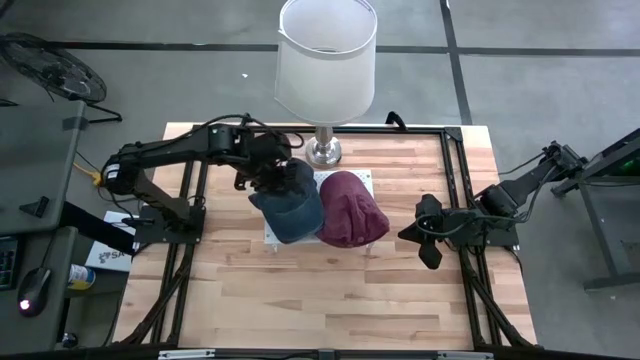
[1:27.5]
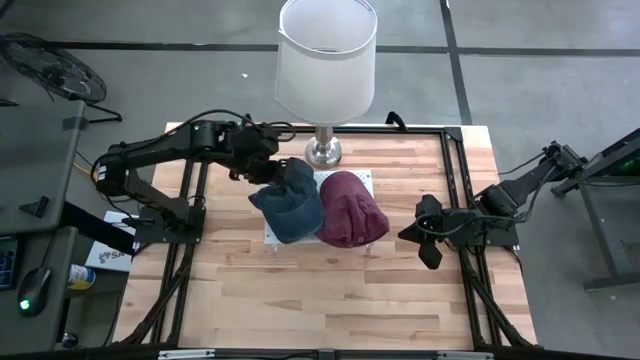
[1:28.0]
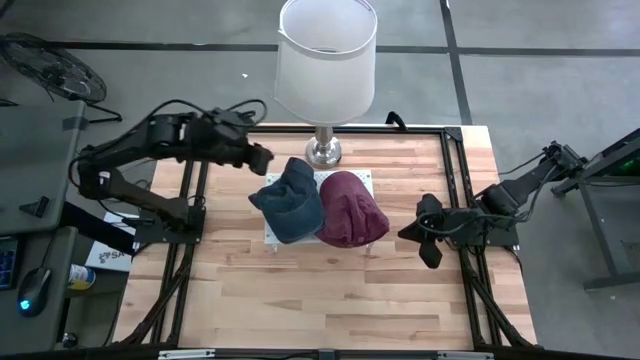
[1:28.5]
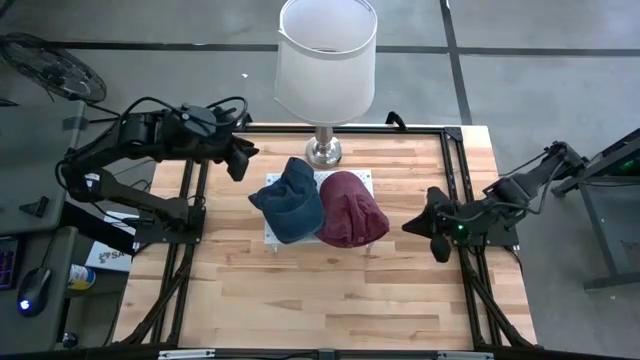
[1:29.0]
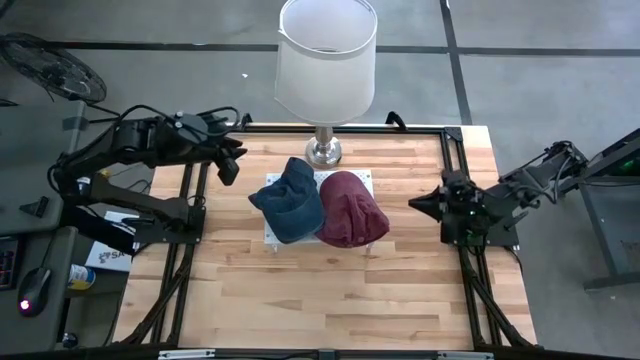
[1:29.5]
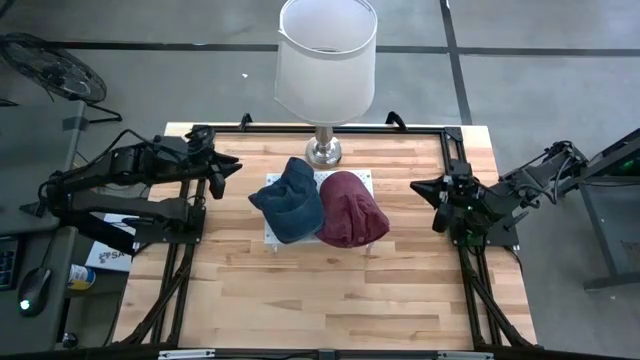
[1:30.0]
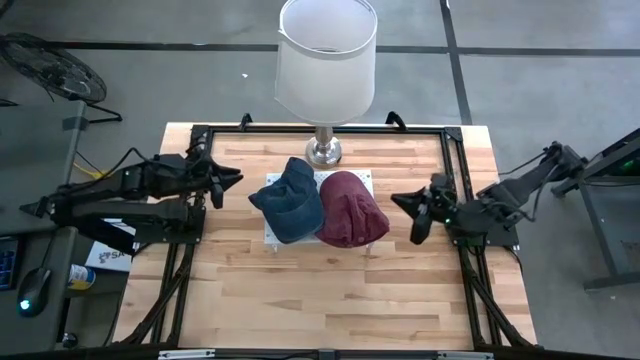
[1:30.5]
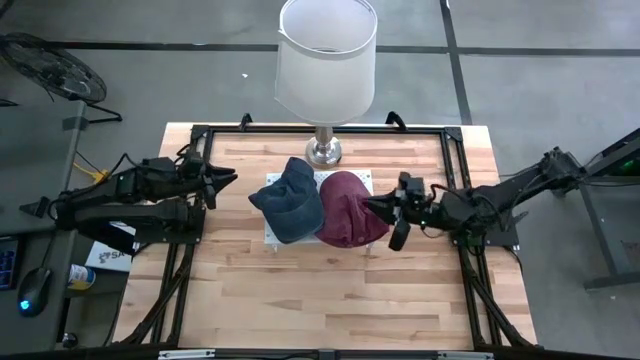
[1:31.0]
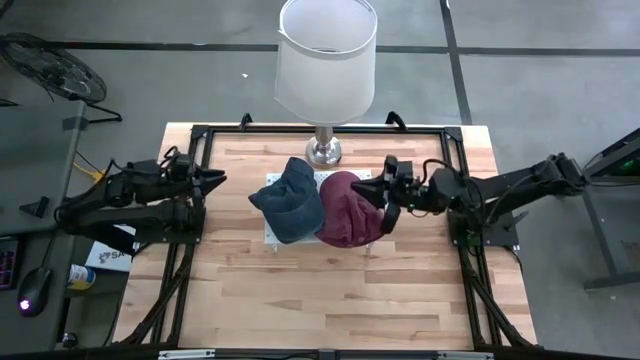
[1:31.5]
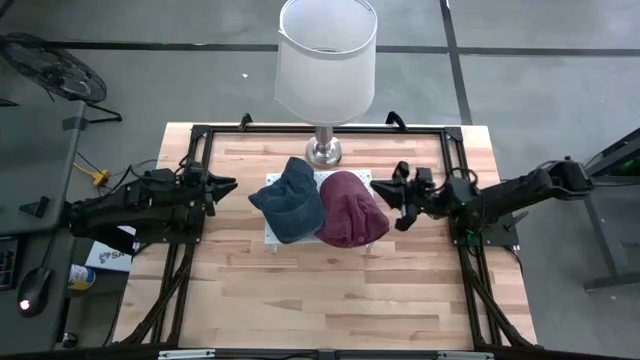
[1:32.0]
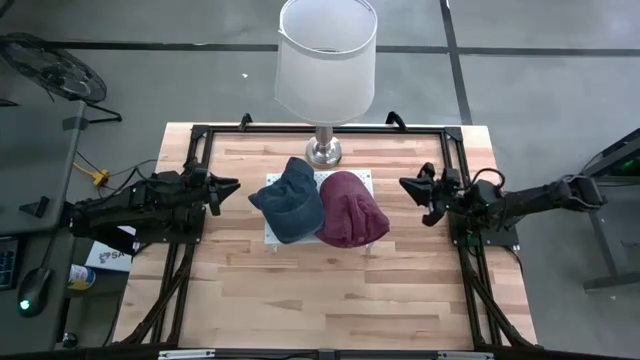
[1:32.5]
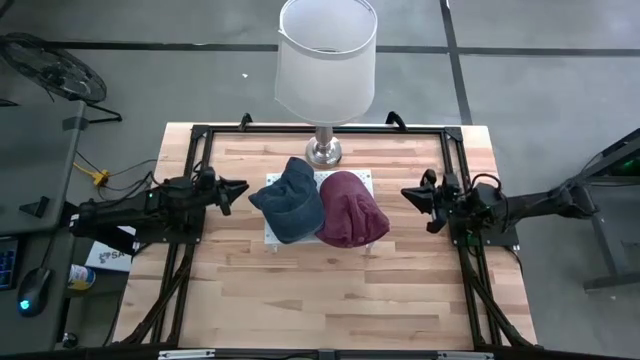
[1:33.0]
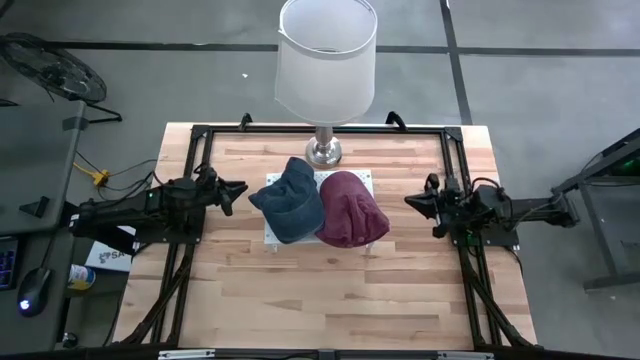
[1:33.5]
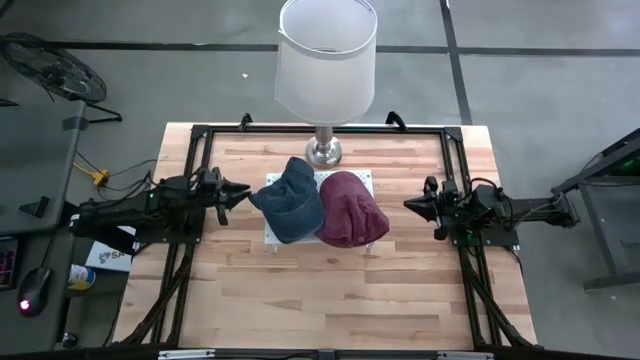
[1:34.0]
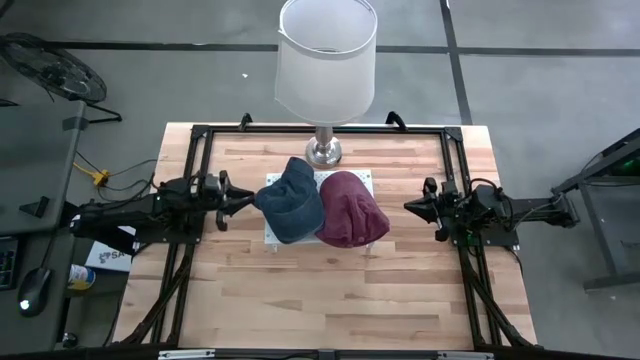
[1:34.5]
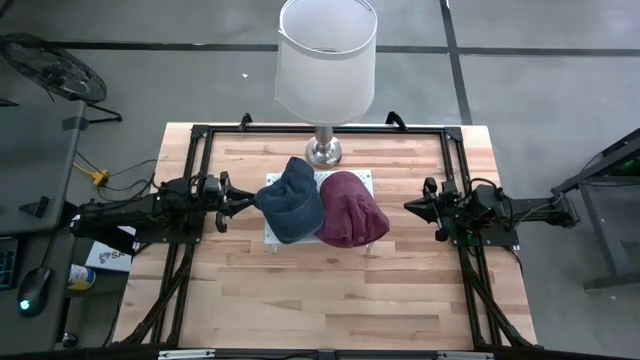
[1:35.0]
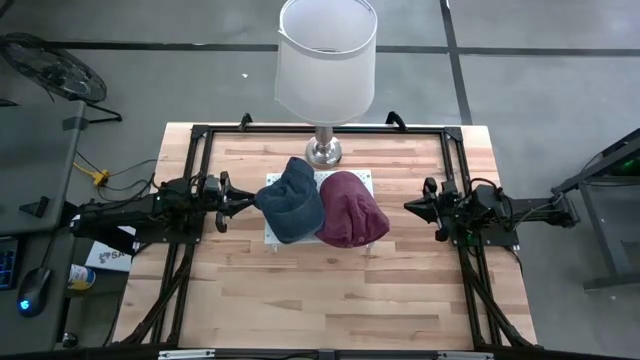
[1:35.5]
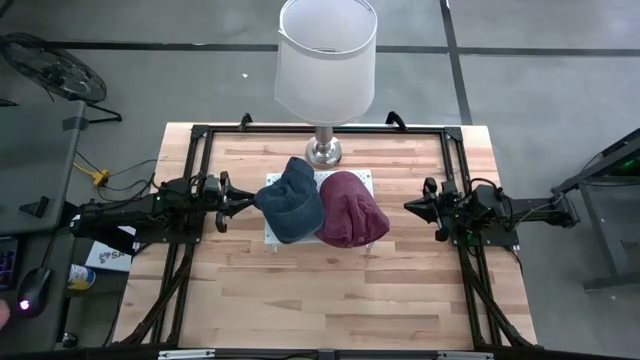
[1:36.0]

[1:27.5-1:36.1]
Task: Pick & Place hat
Return to Home Position

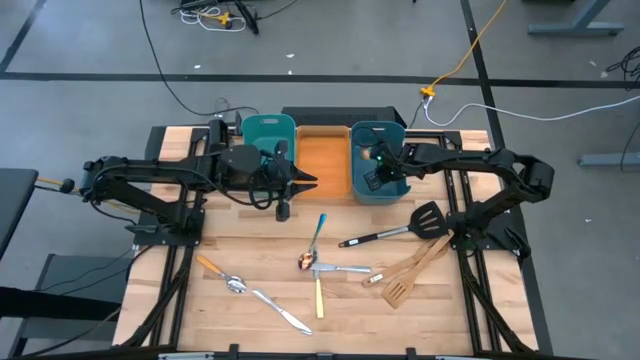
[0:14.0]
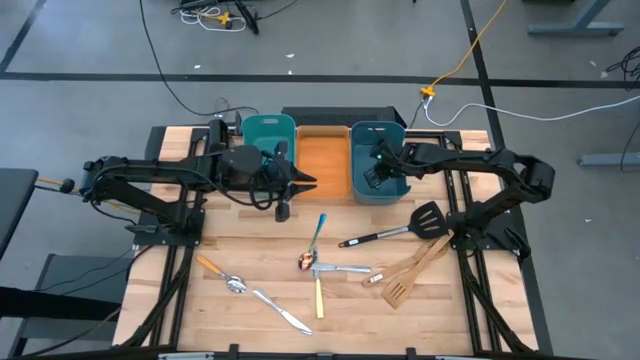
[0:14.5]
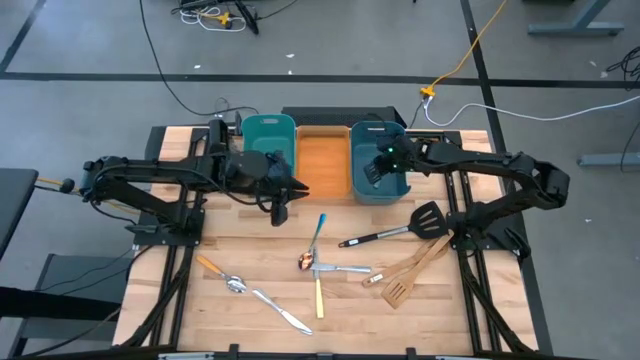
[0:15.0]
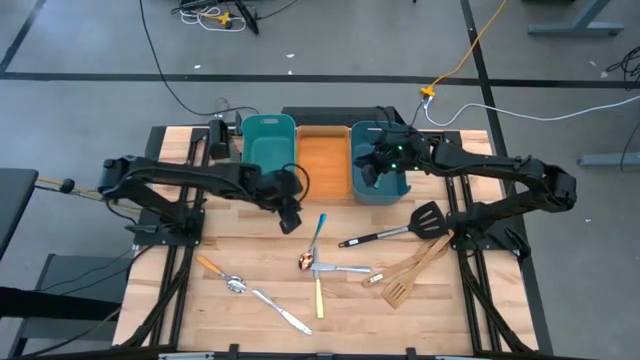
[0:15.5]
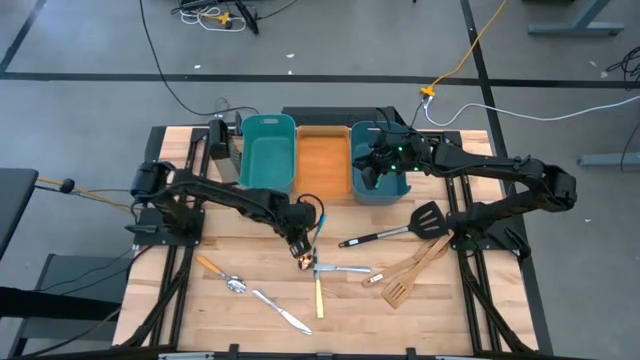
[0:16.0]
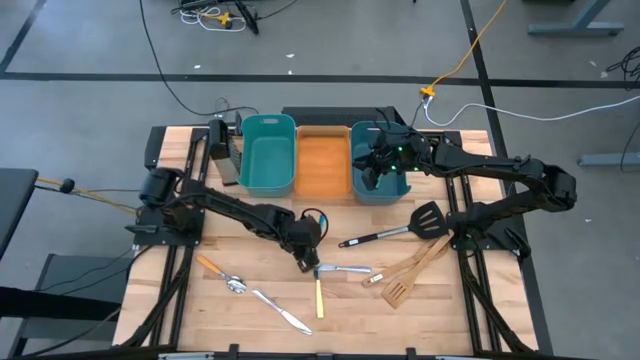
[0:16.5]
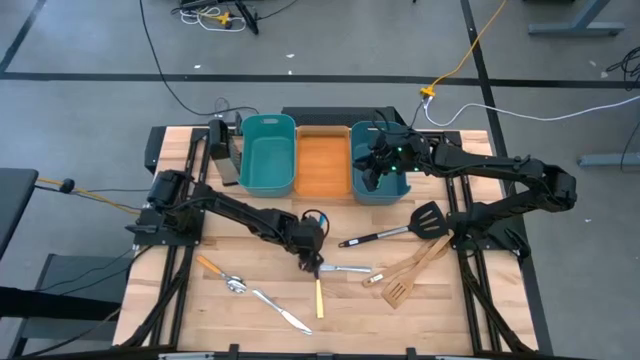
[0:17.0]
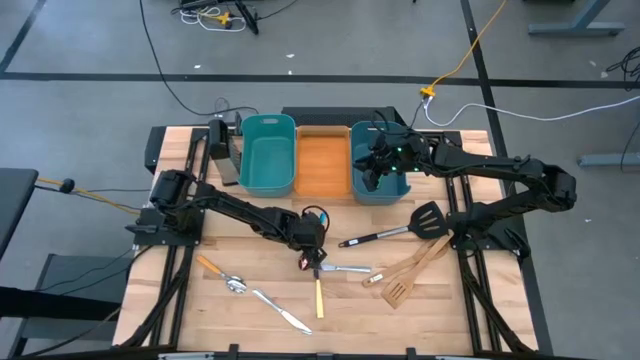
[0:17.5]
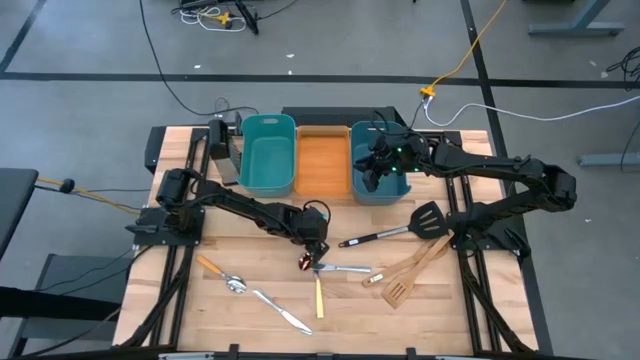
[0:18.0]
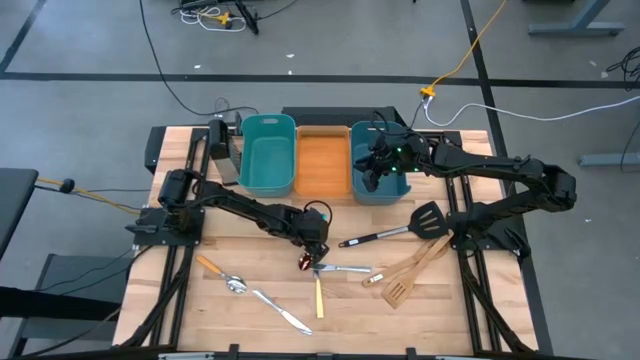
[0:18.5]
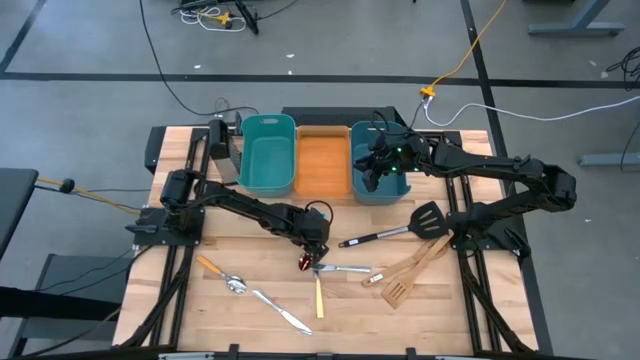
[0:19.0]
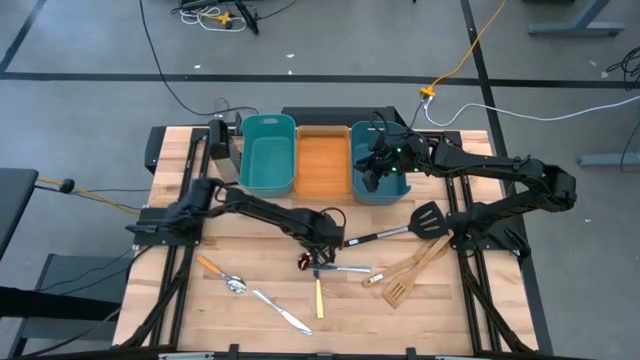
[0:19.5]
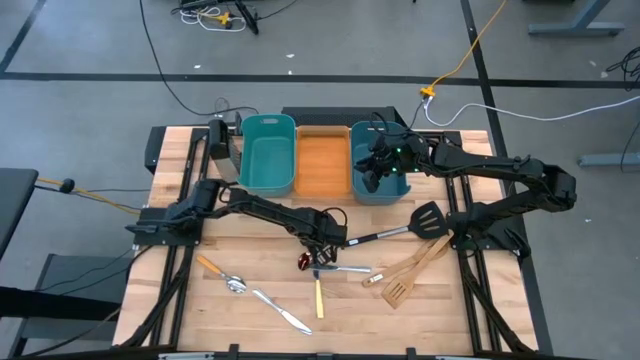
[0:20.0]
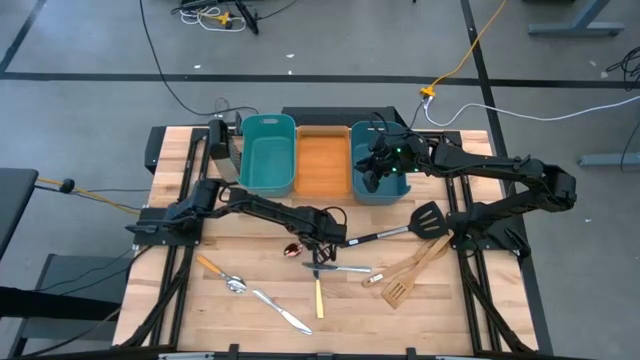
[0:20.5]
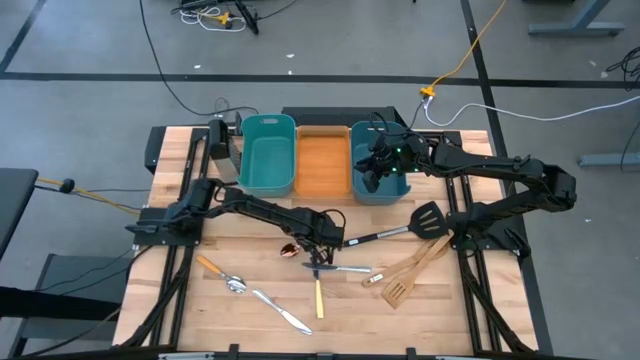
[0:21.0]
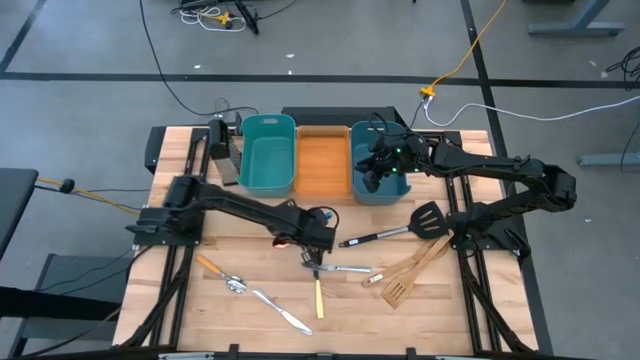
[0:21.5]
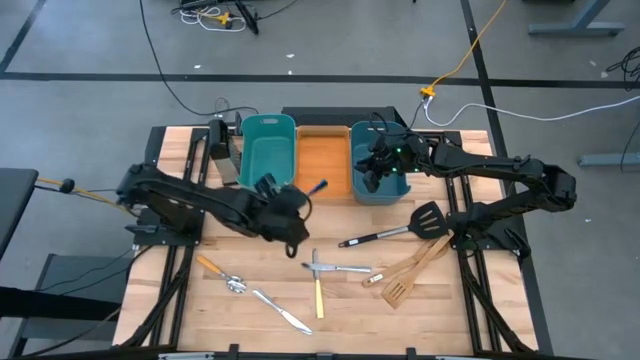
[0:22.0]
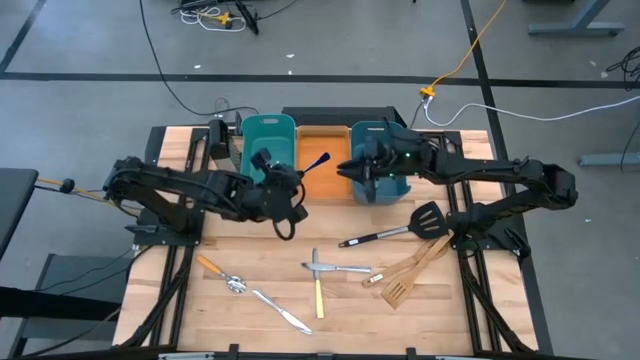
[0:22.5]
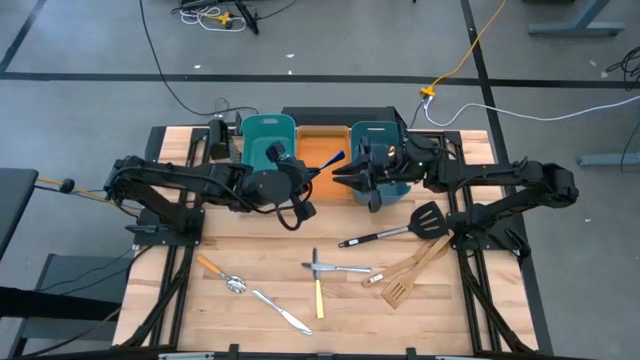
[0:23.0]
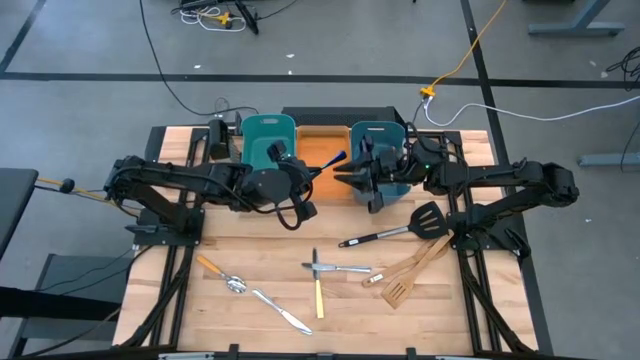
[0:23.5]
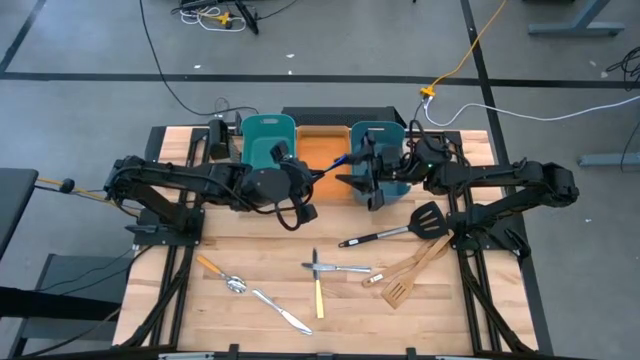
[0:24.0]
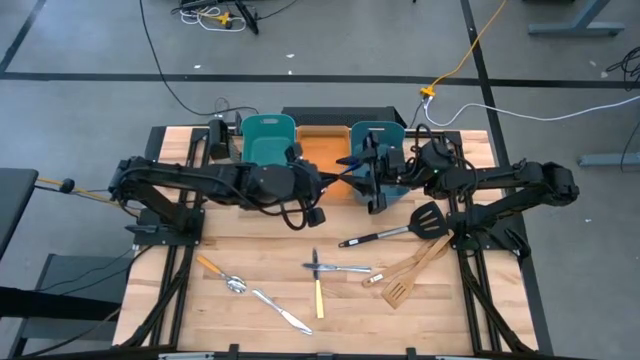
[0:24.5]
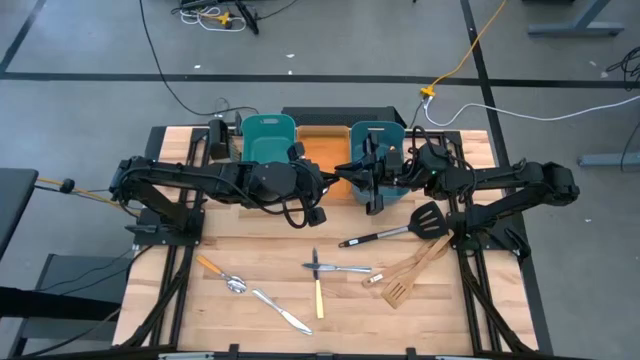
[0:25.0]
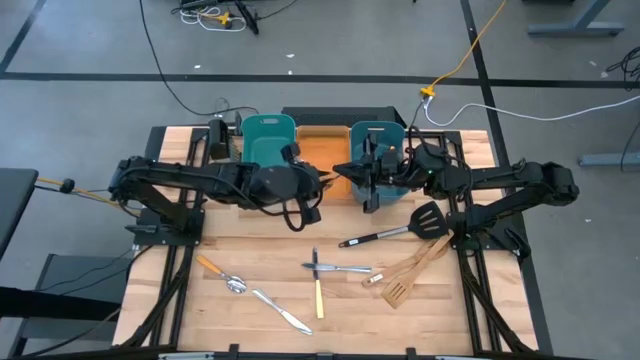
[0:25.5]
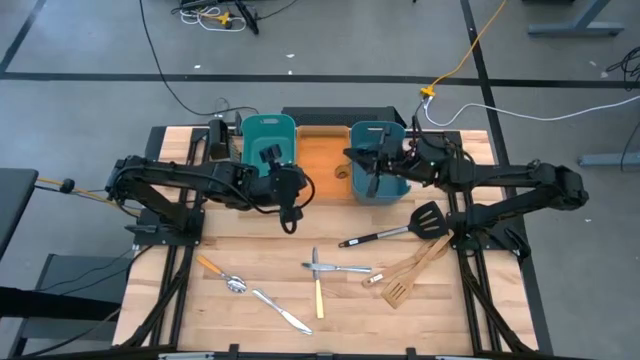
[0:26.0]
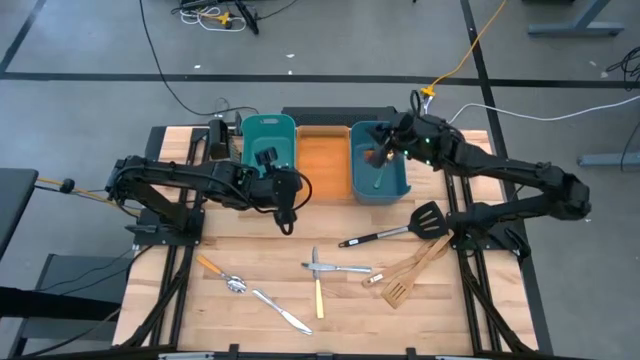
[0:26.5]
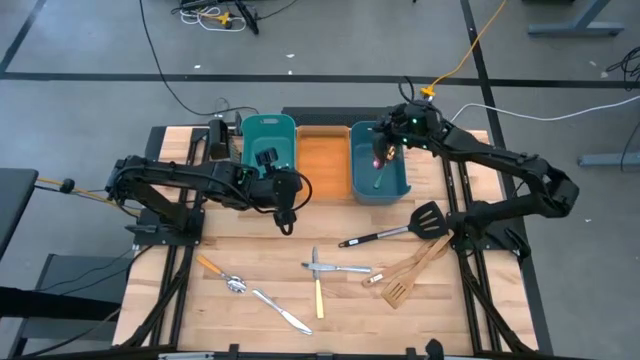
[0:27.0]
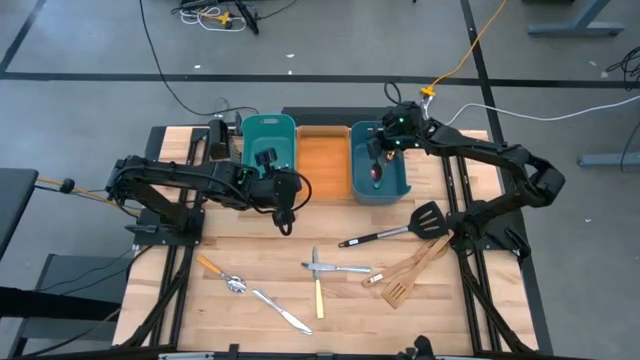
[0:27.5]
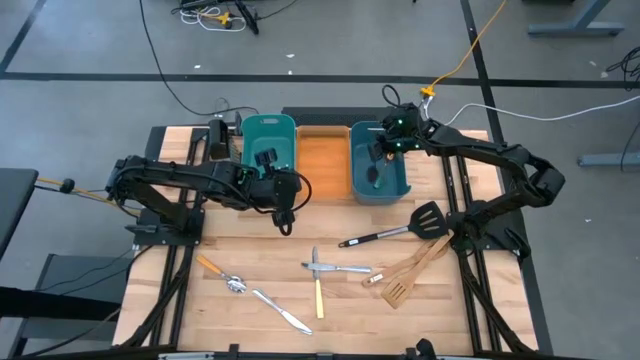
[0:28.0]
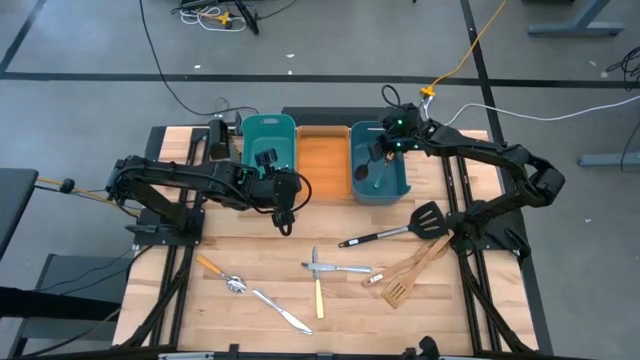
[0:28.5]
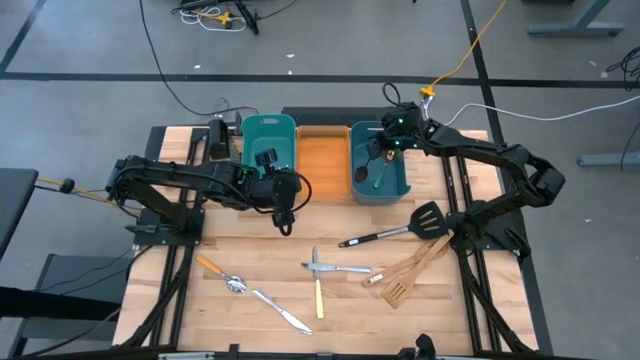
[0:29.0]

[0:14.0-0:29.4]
Task: Pick & Place Kitchen Items
Put the blue and purple and green spoon into the dark blue bin
